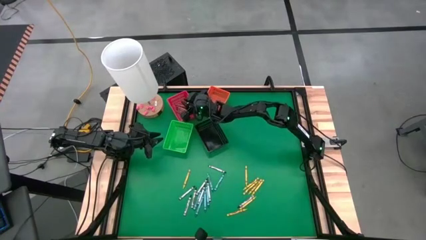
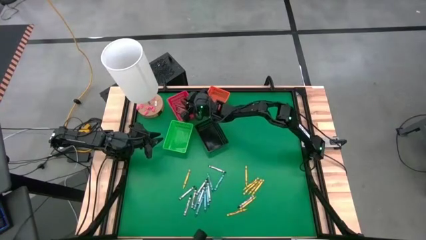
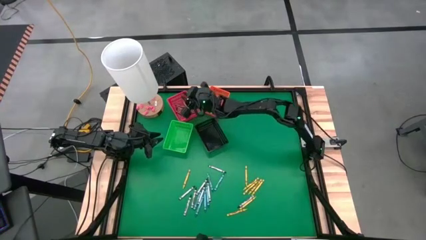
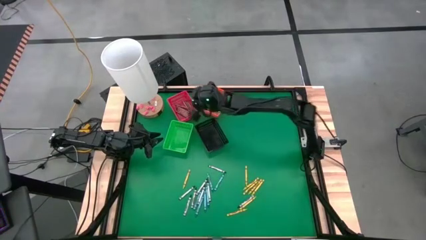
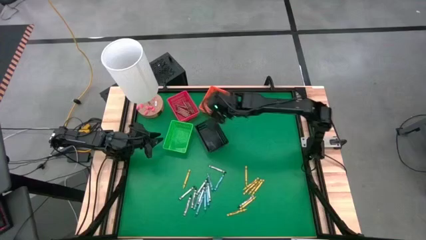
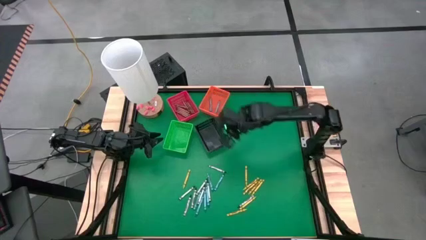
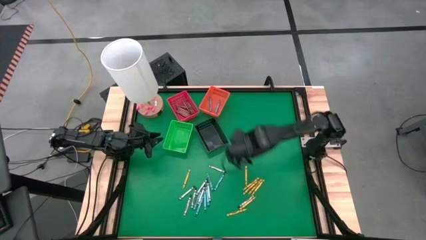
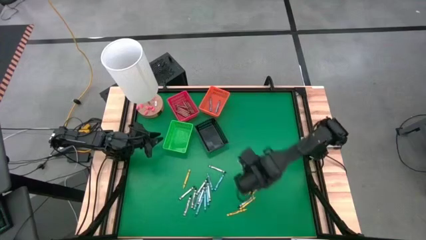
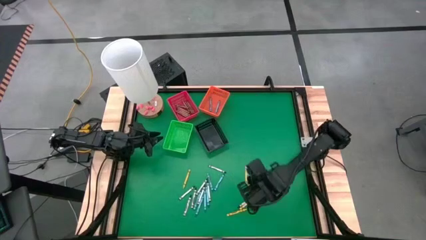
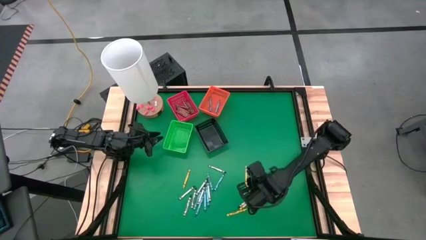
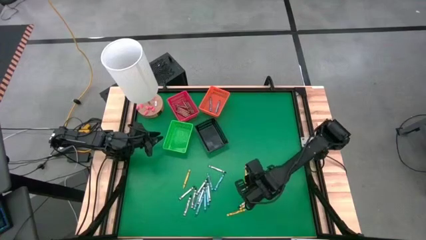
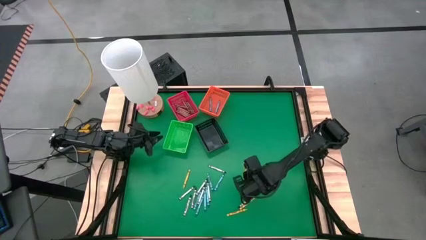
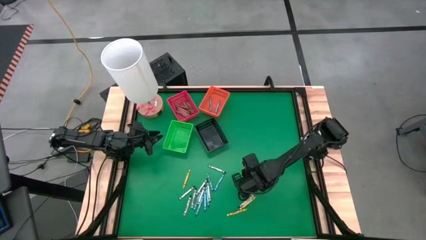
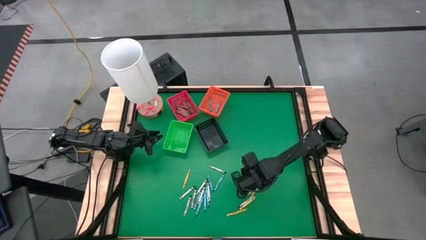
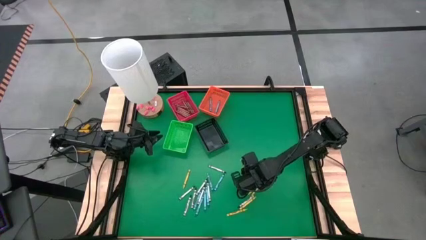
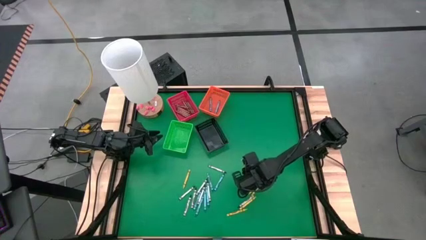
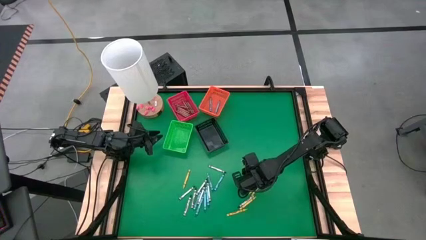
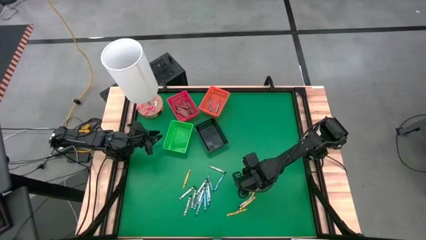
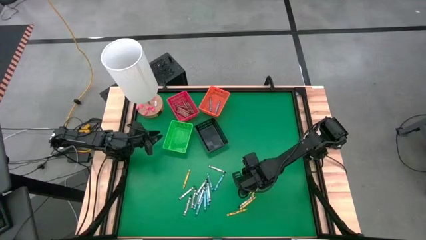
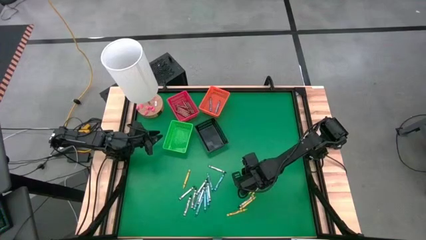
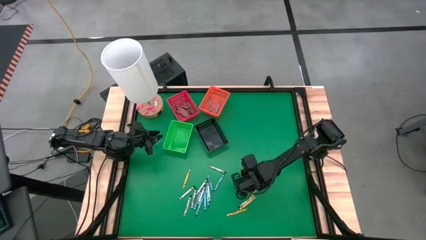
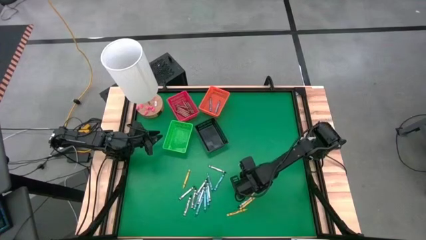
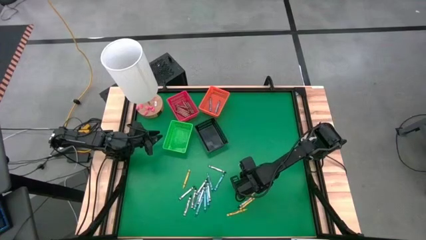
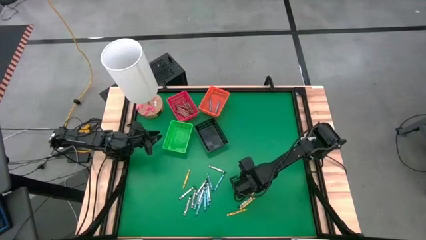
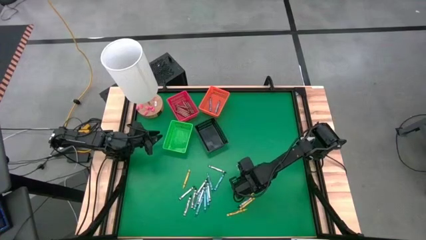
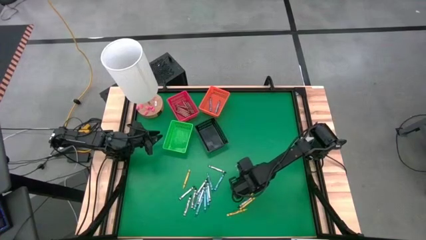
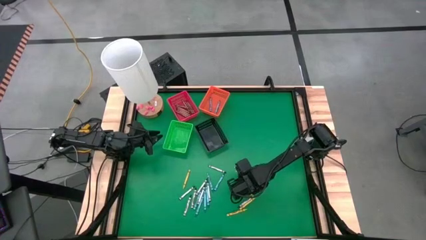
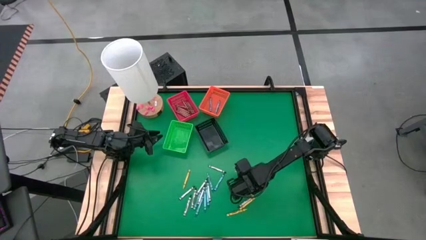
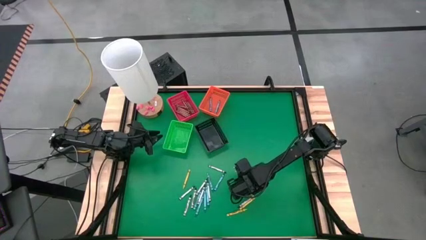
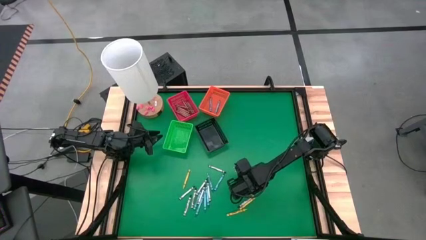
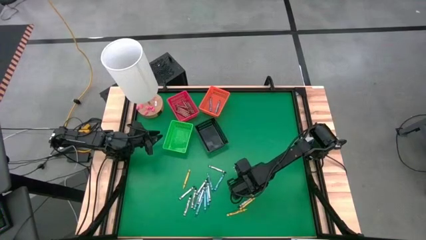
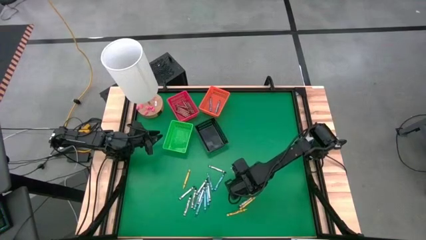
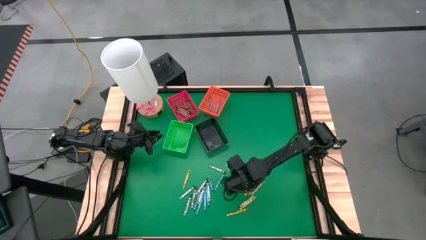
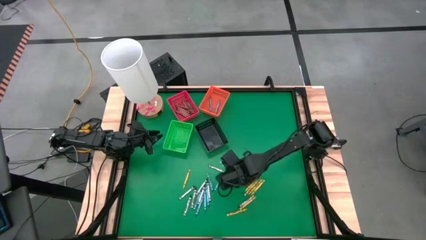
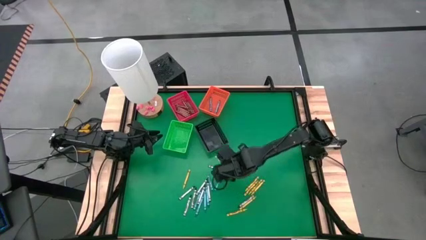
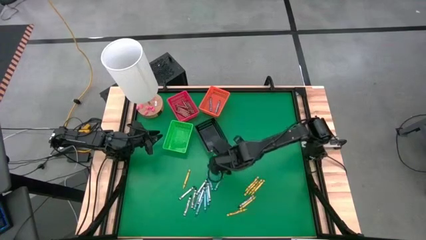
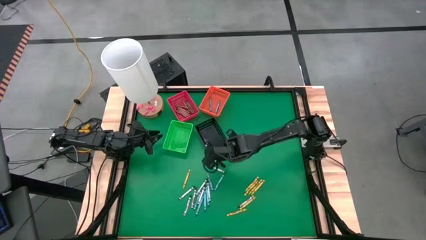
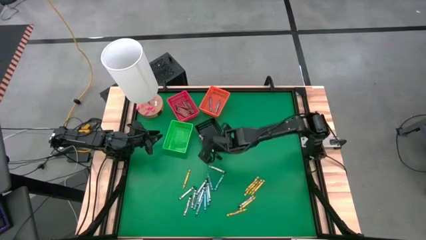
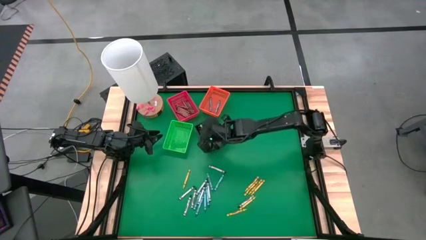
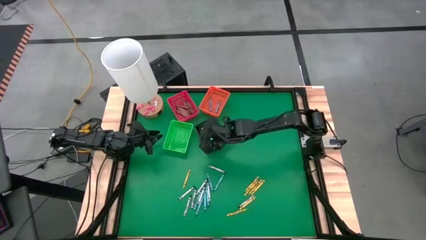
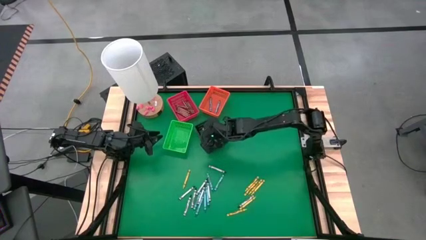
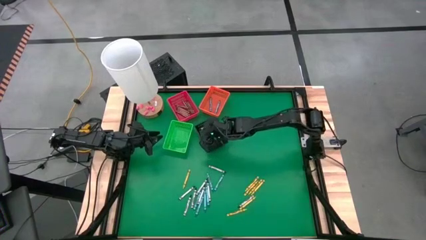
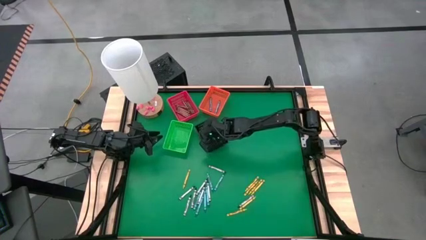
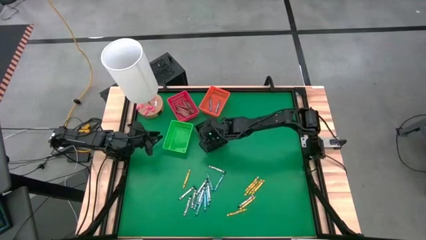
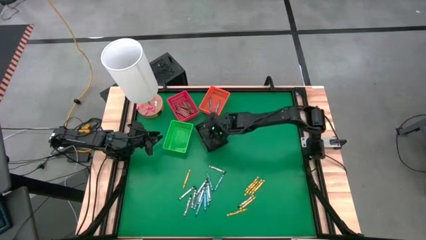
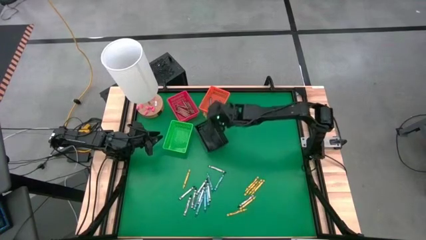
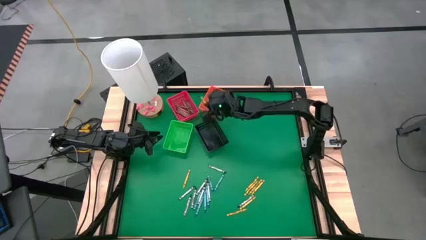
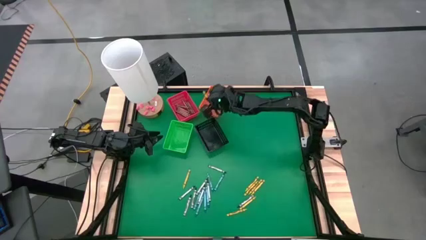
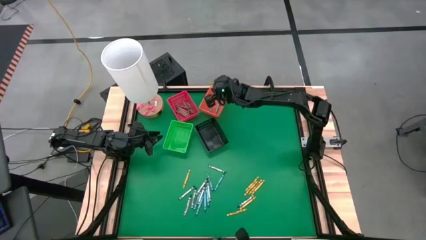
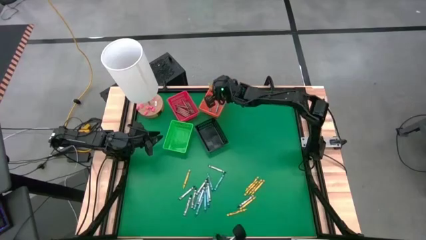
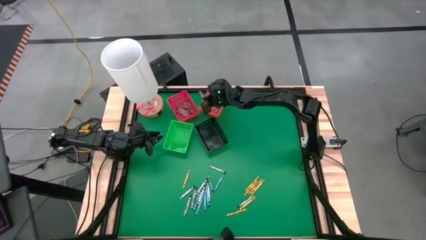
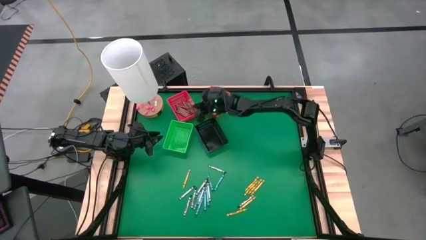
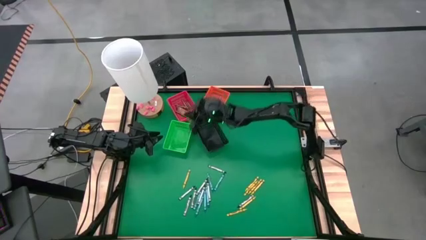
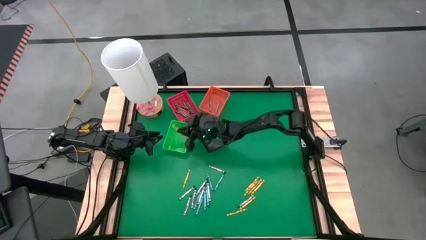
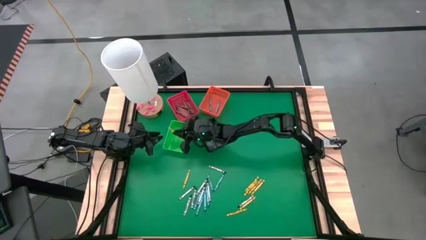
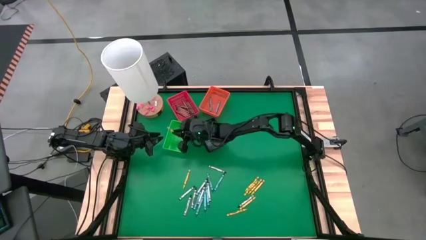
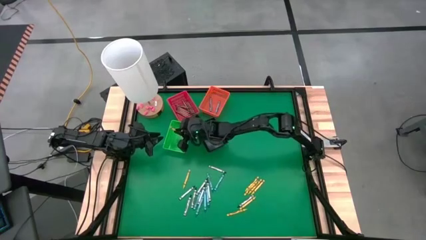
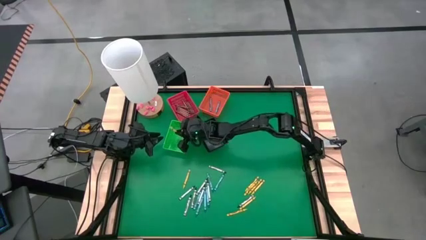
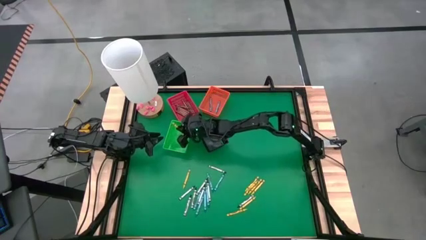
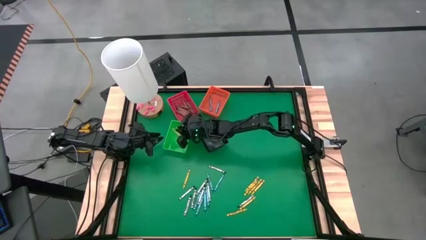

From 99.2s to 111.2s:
Task: Sort crayons
Put the yellow crayon into the green bin

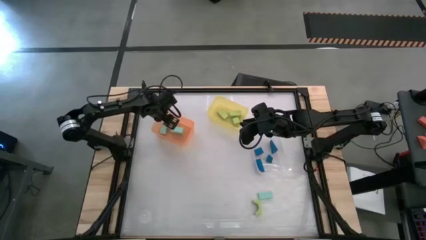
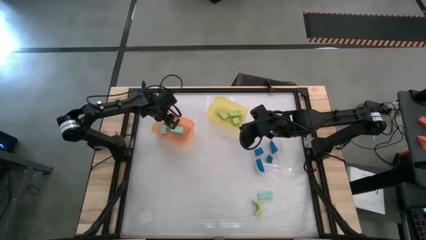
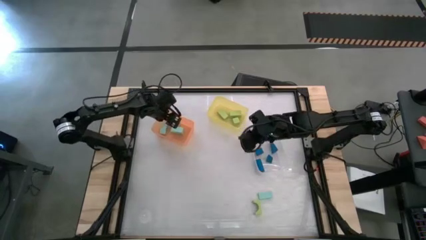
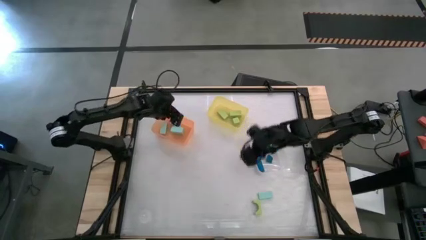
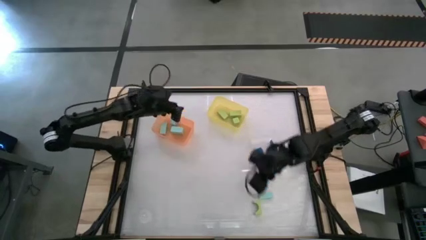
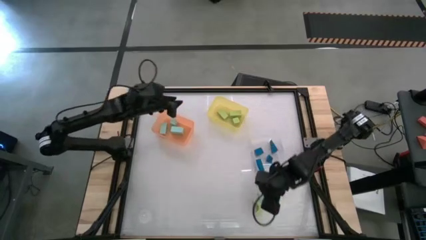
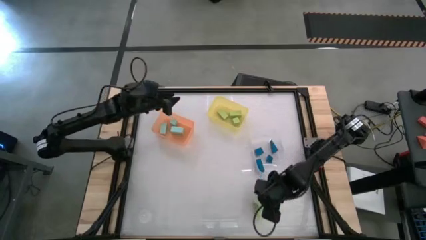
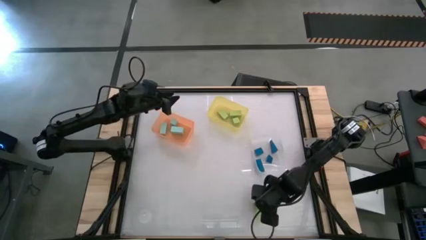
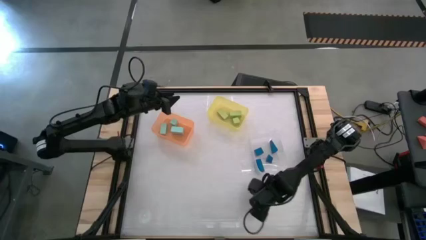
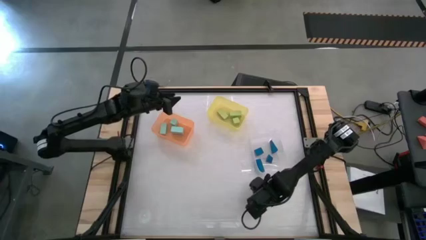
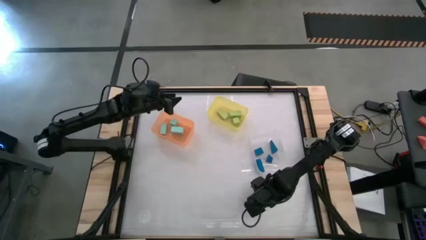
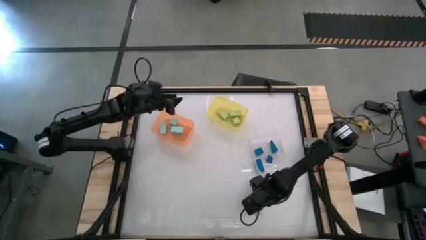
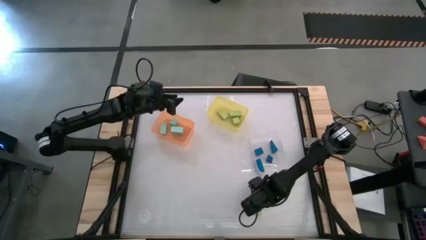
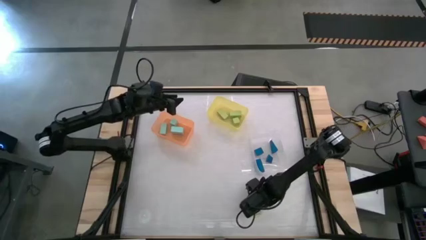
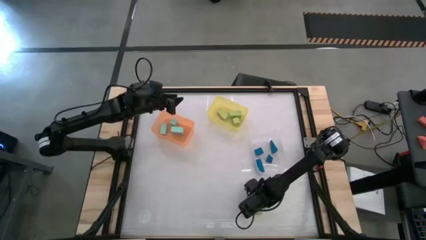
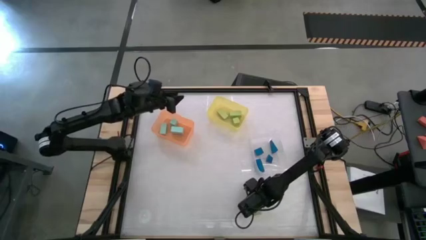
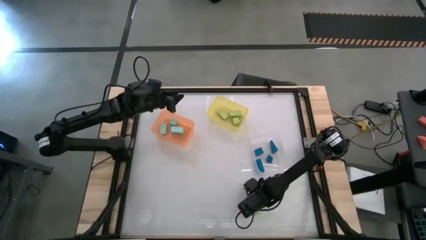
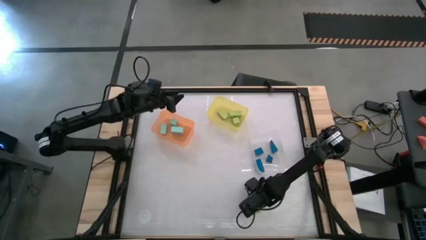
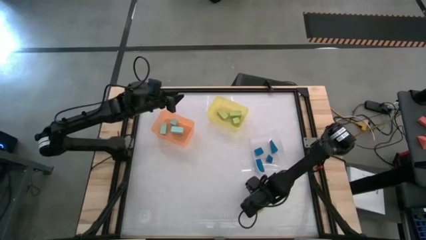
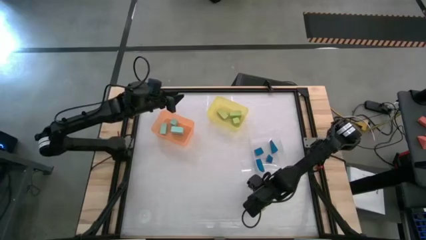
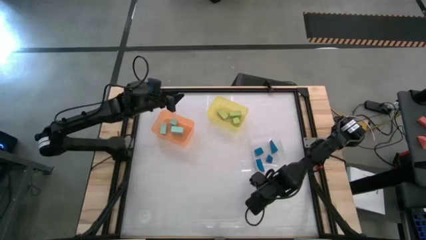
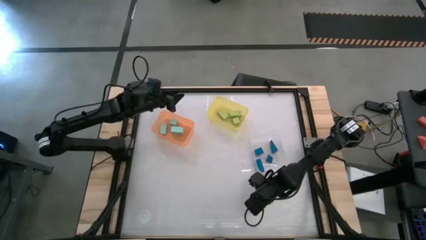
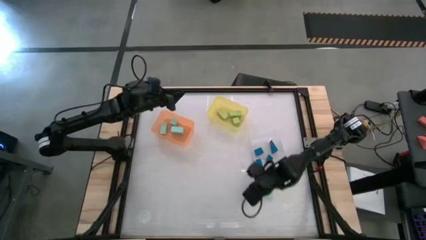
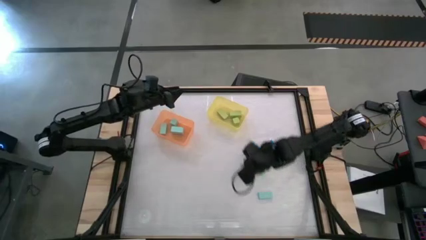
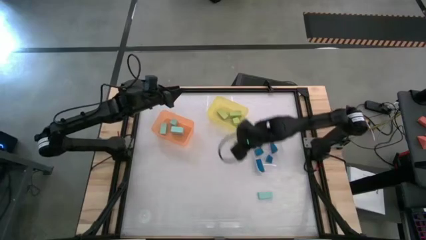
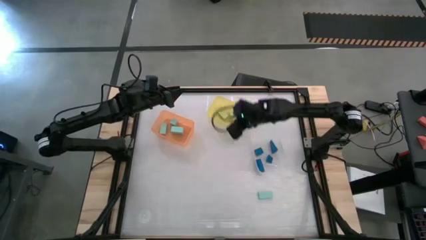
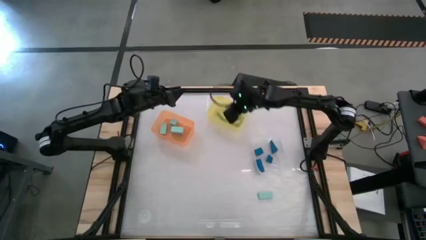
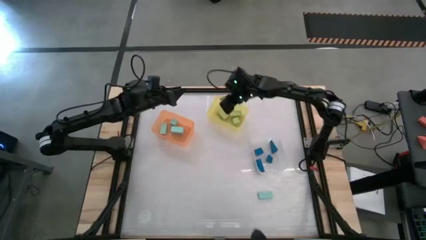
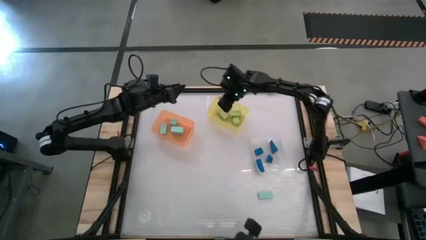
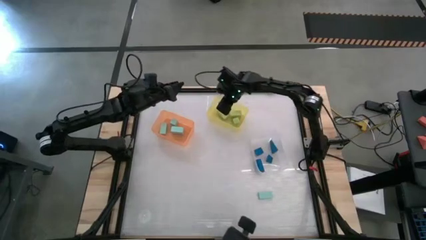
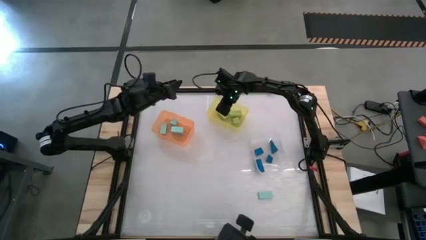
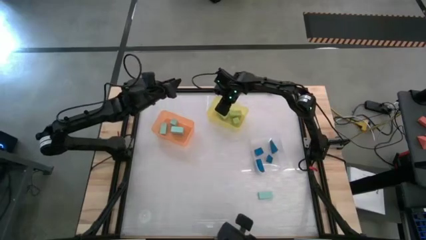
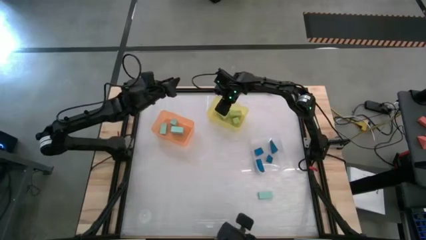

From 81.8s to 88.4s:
Task: Sort & place blocks by color
Put the light green block into the yellow bin
